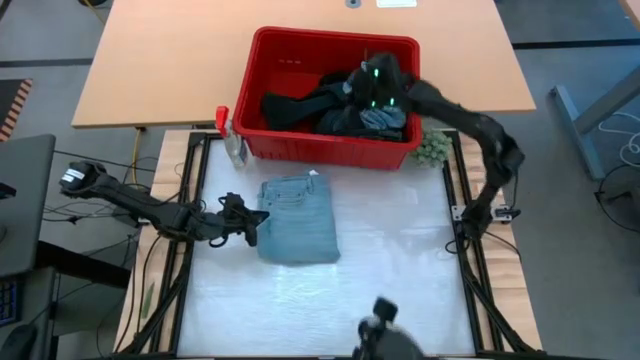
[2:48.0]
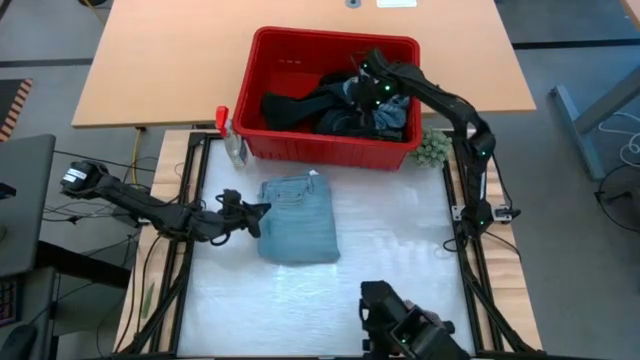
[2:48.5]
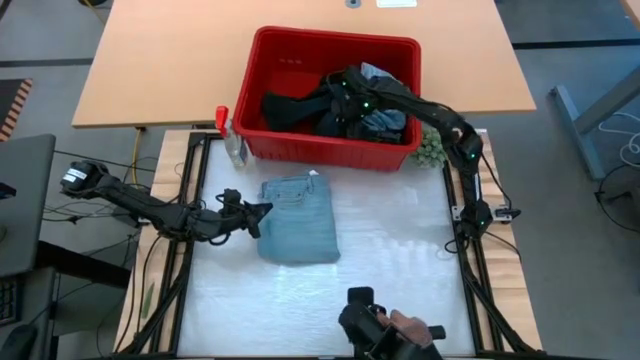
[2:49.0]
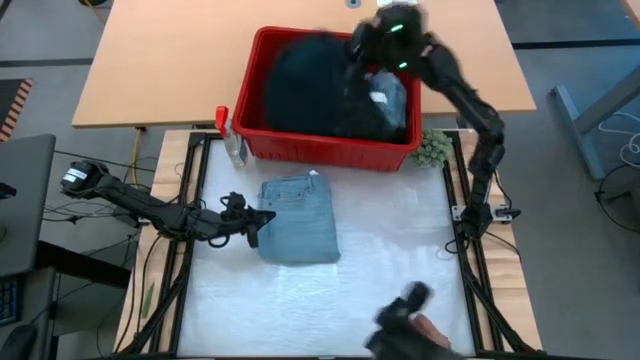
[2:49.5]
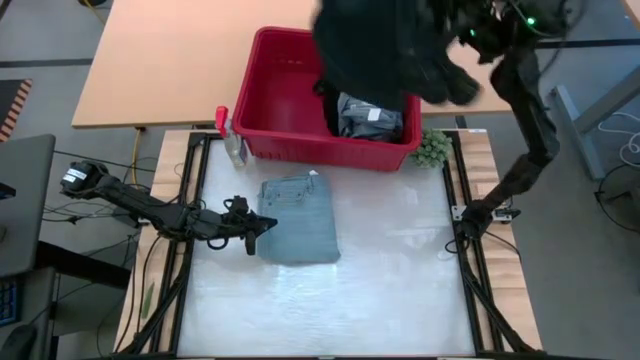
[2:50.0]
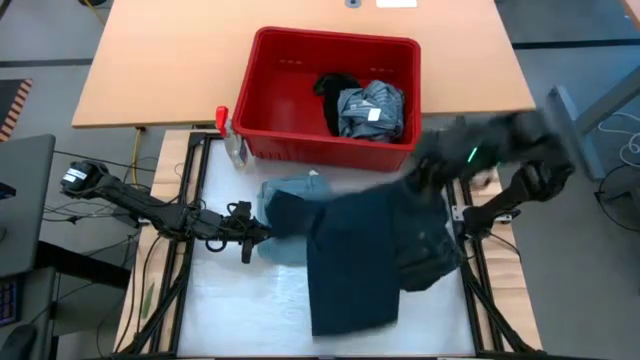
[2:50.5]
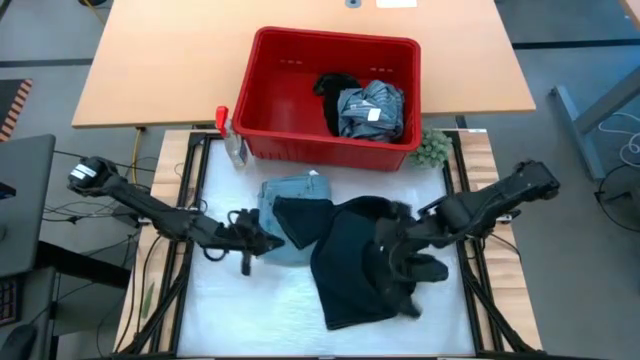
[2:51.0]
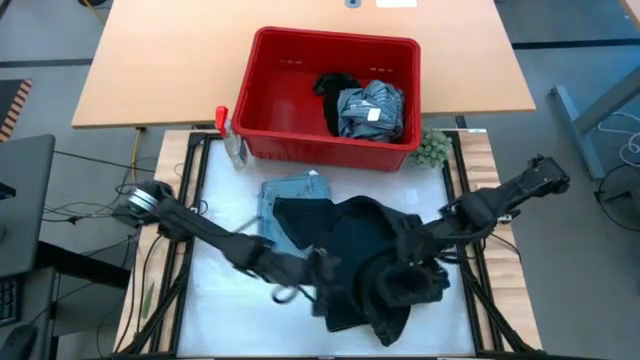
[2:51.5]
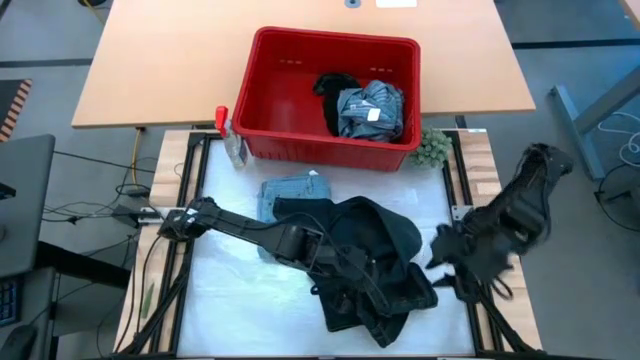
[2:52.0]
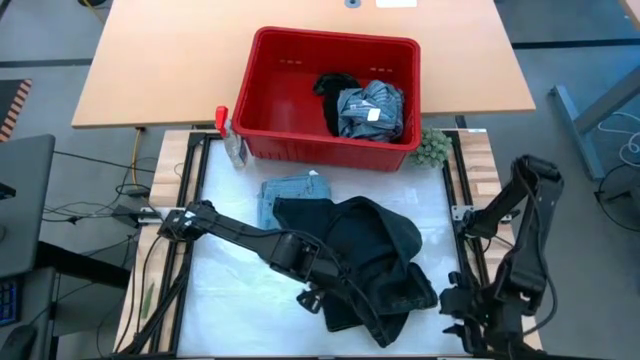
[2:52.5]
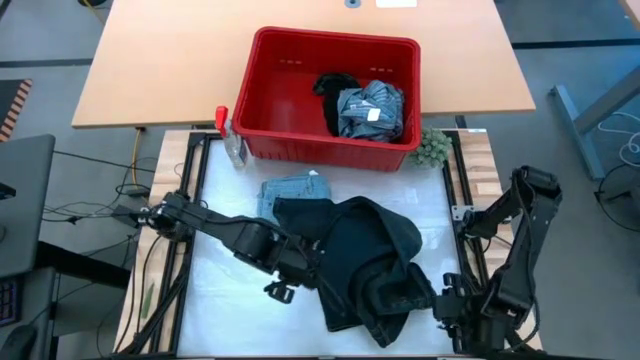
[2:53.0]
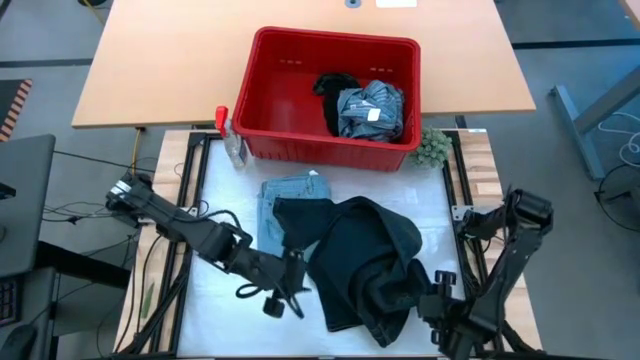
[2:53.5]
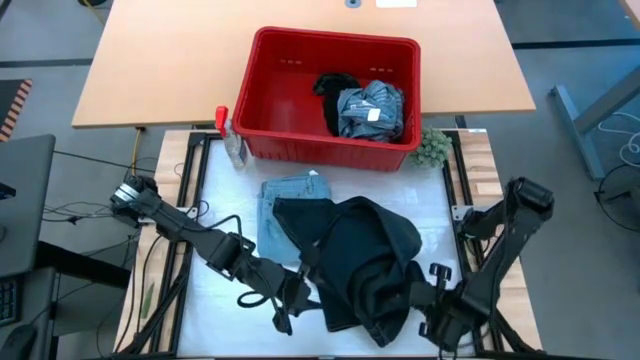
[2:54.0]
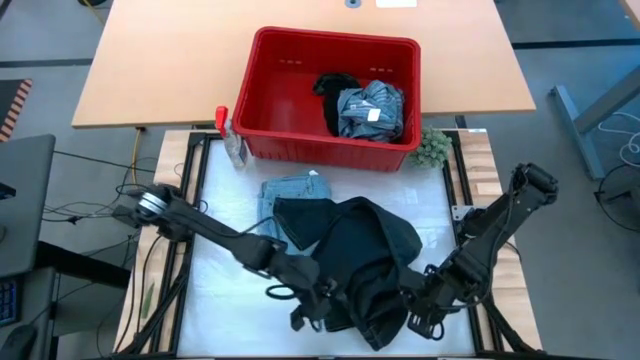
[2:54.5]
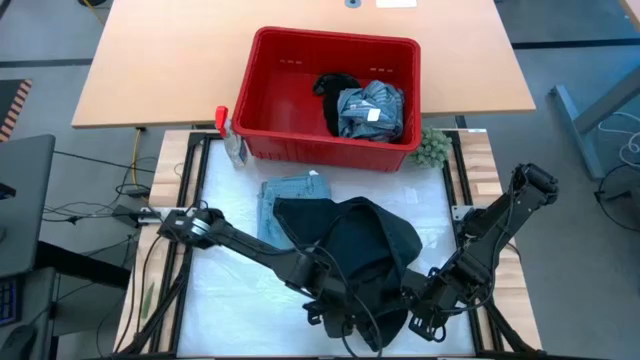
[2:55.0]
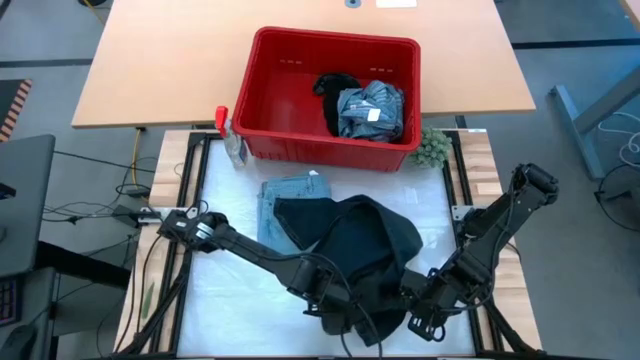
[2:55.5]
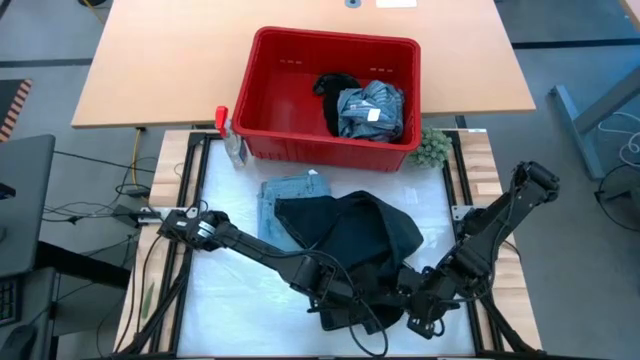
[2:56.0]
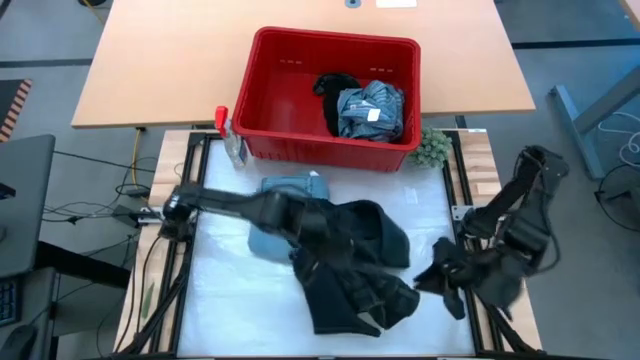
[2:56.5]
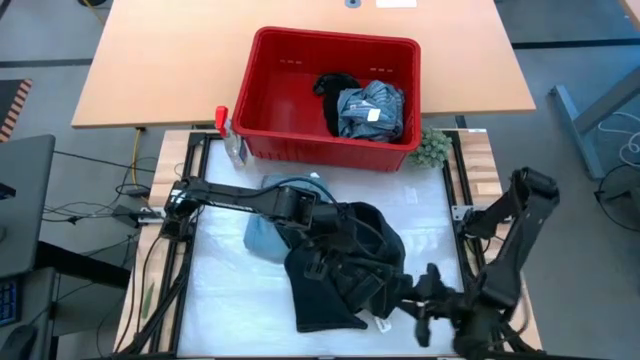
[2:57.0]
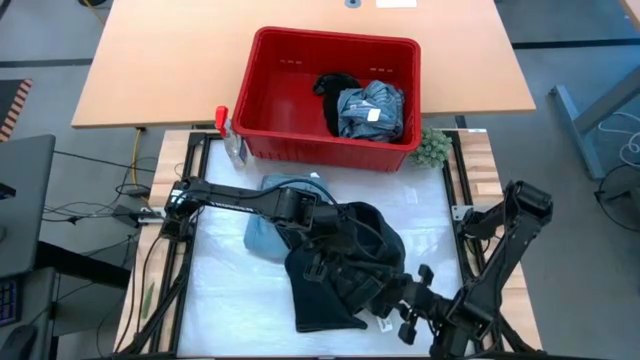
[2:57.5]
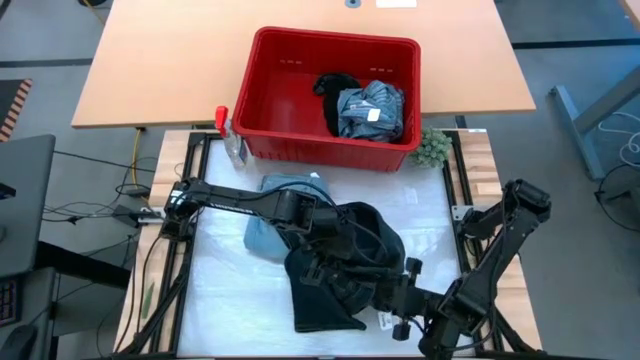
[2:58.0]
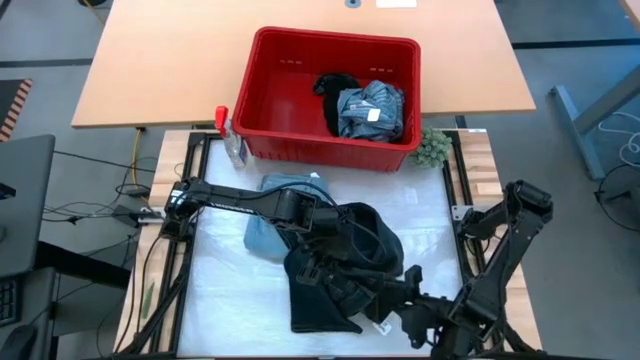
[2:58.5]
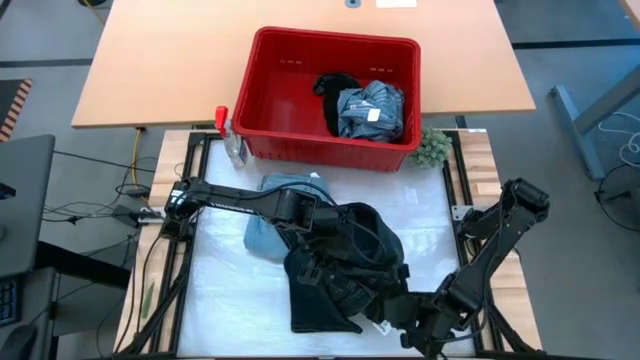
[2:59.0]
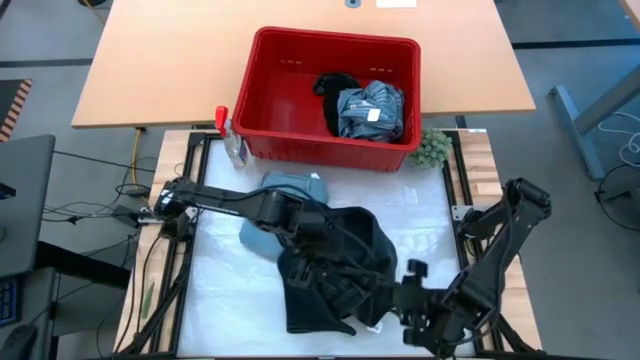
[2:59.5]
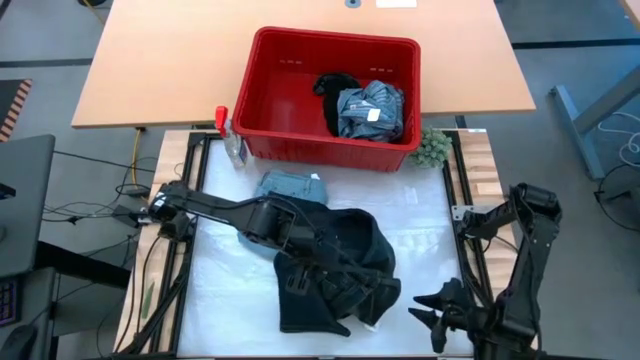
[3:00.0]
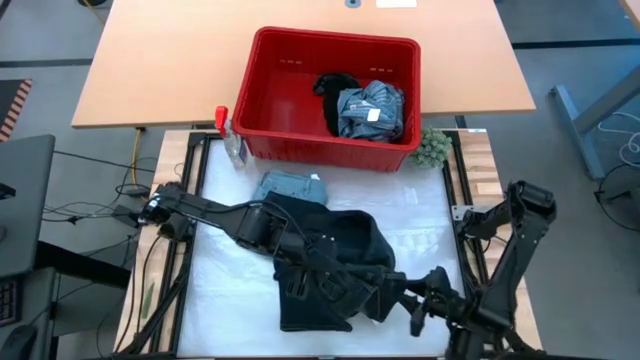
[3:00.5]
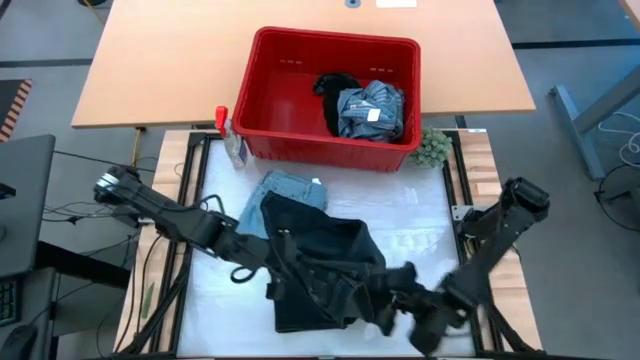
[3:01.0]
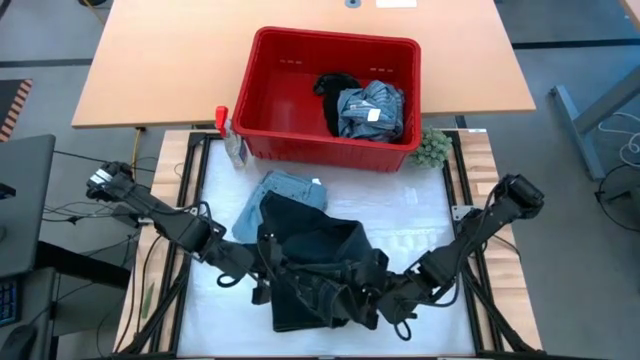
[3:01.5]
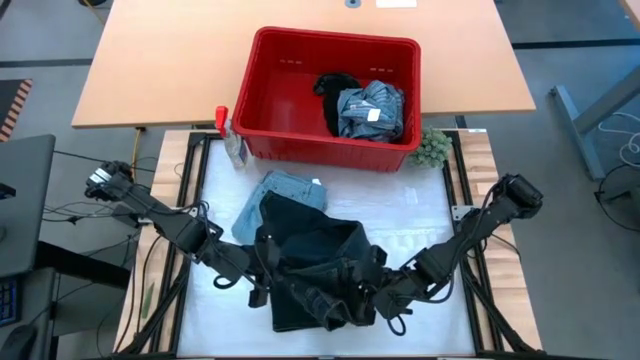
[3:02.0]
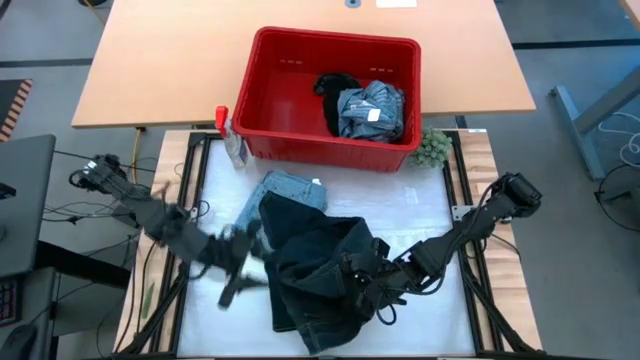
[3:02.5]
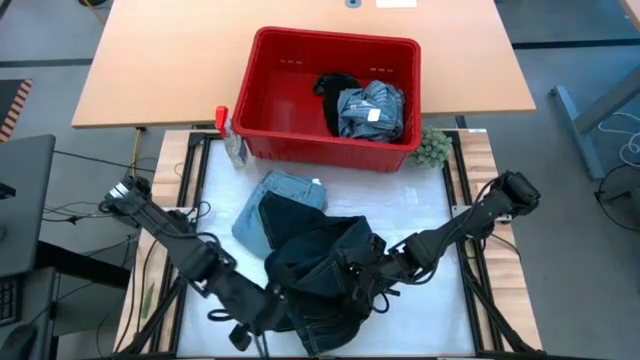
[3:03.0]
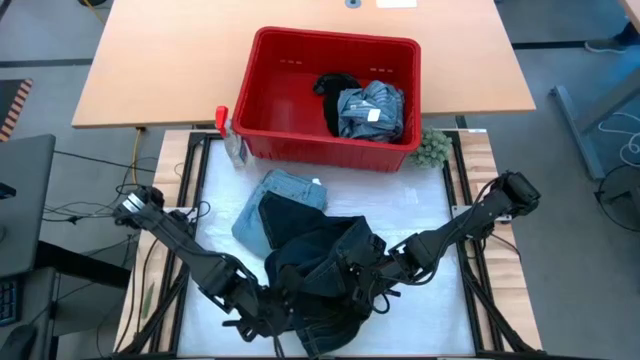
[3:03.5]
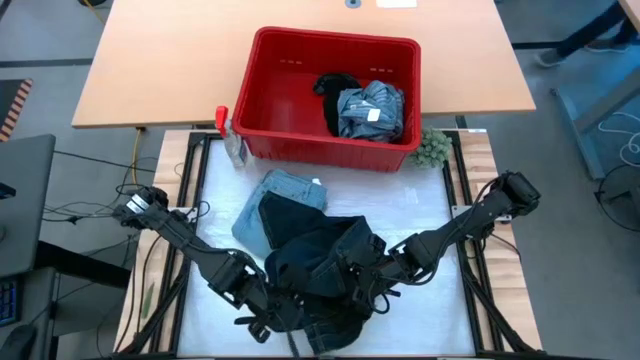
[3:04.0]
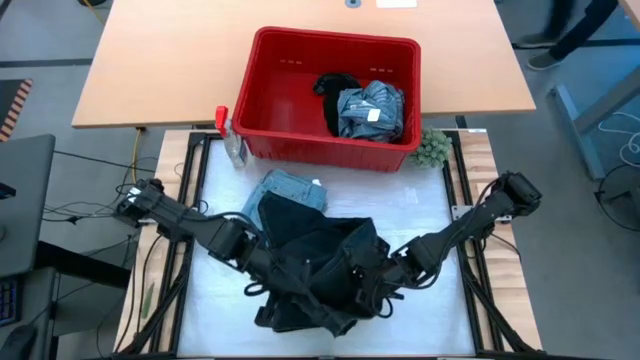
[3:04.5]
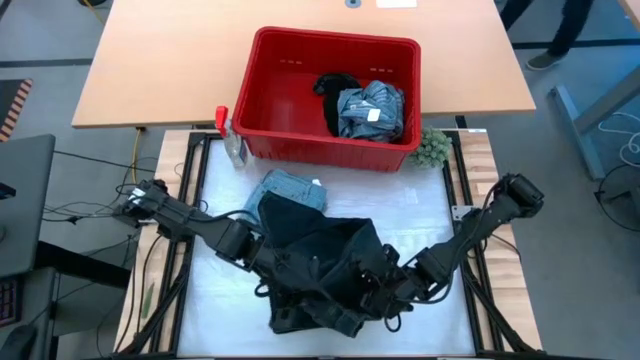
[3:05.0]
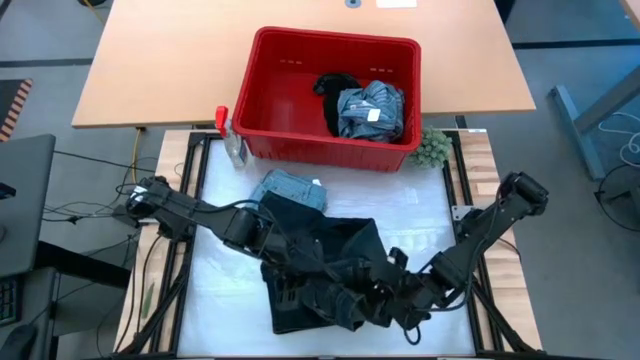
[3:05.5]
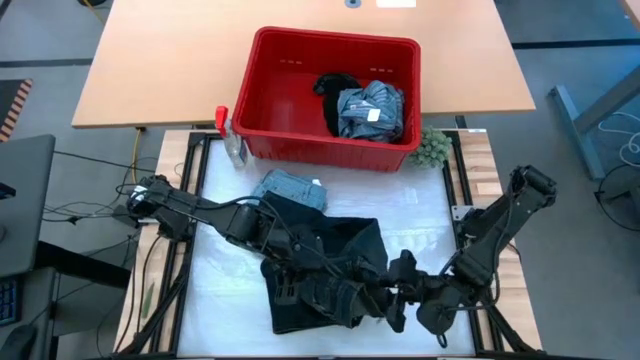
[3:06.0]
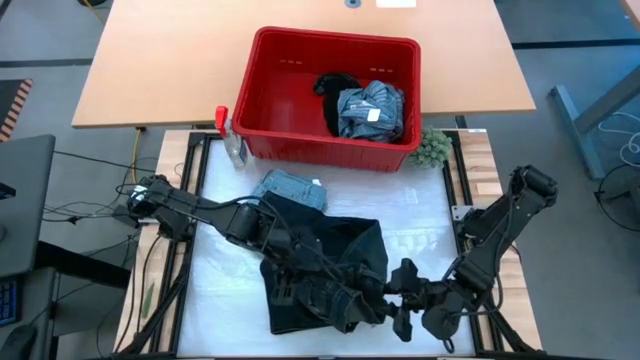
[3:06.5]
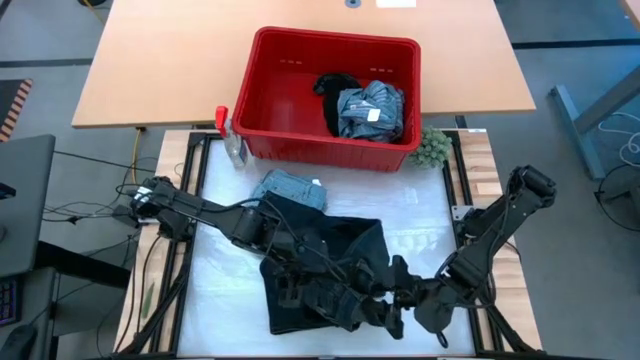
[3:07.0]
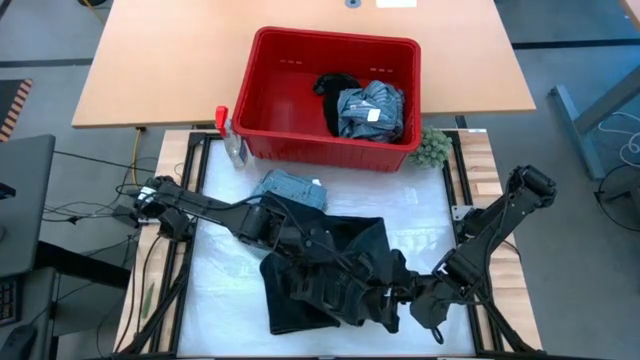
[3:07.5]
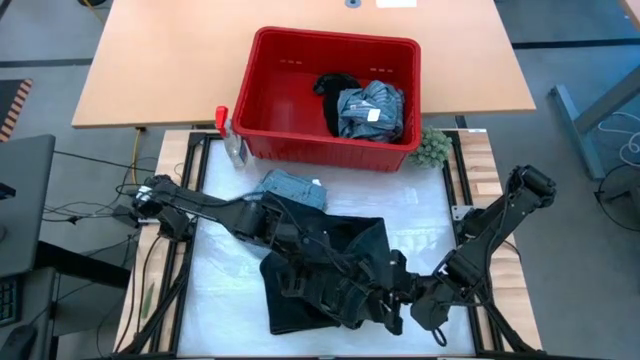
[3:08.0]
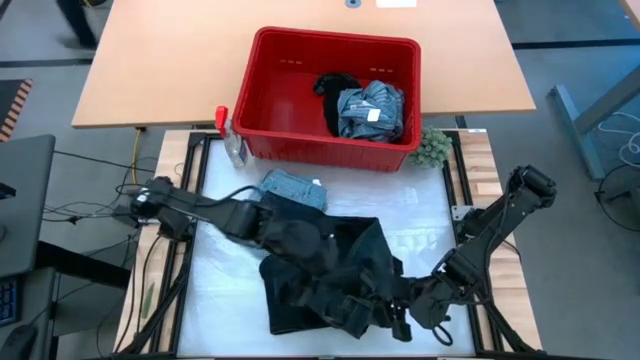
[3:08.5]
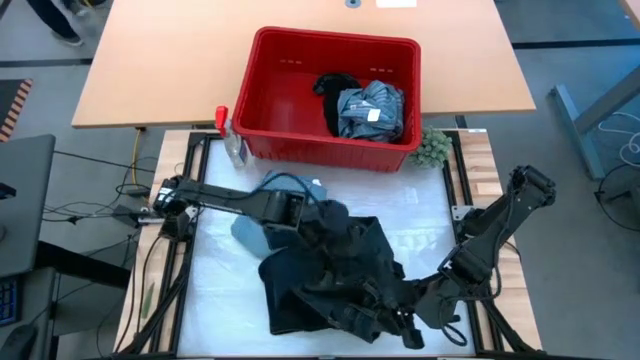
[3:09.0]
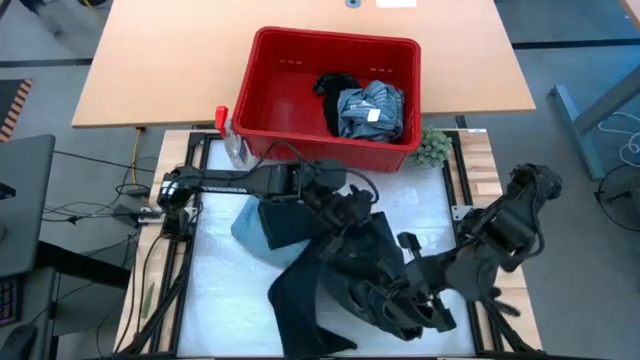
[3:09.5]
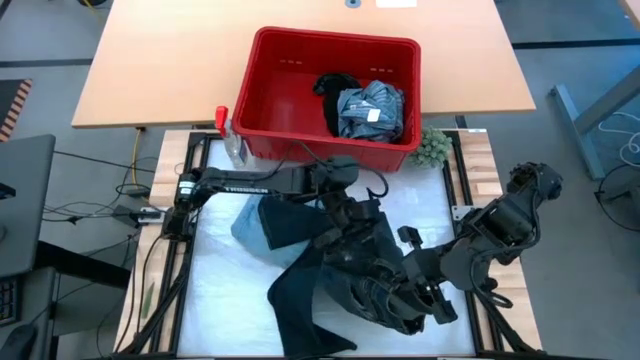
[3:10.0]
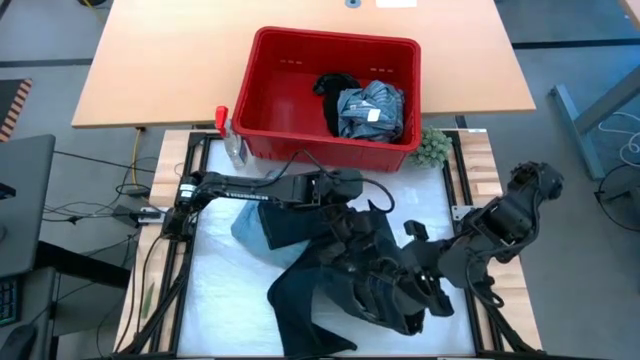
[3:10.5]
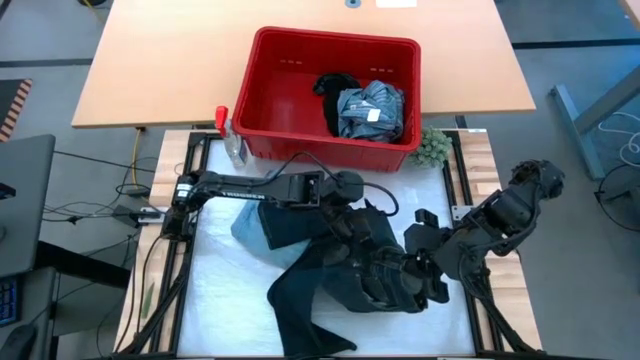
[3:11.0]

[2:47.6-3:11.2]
Task: Fold laundry
Fold the black pants from the red laundry bin
